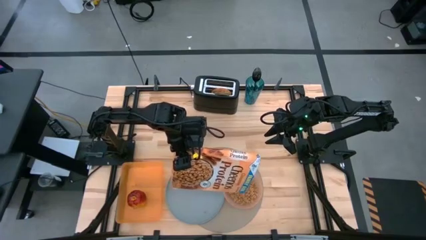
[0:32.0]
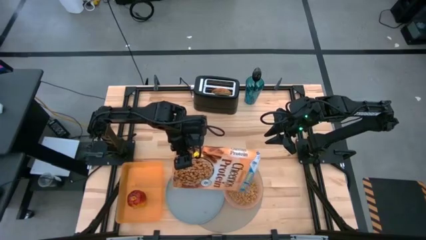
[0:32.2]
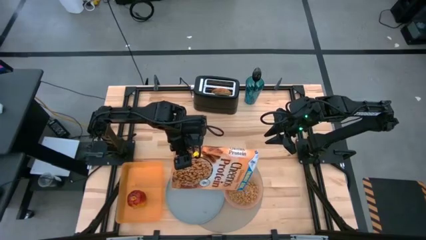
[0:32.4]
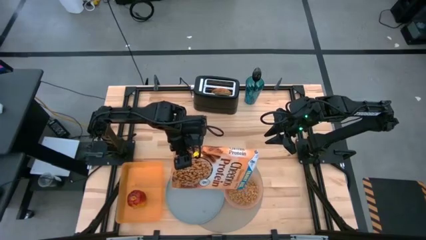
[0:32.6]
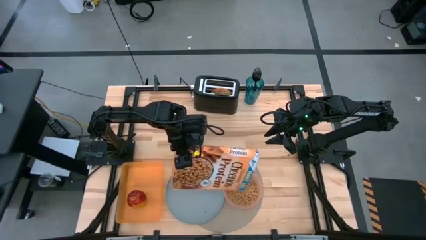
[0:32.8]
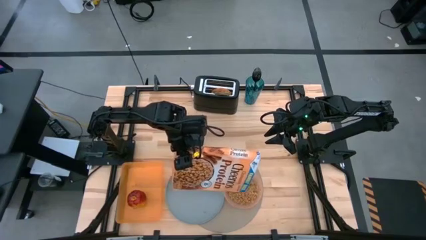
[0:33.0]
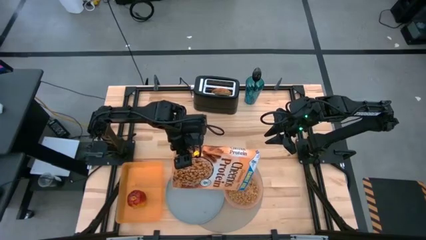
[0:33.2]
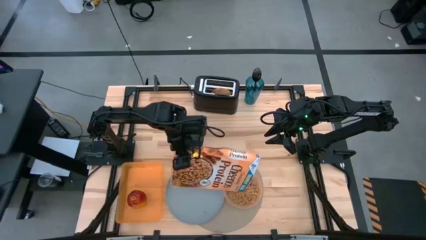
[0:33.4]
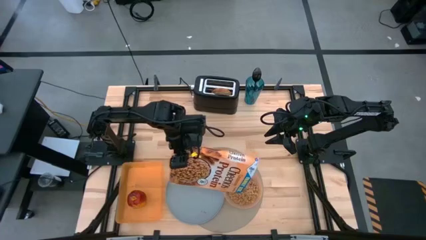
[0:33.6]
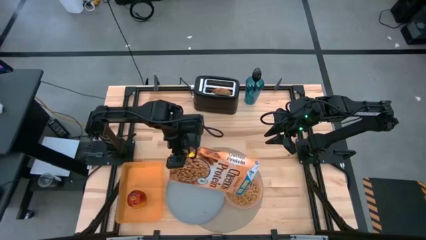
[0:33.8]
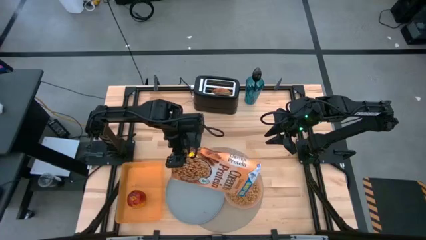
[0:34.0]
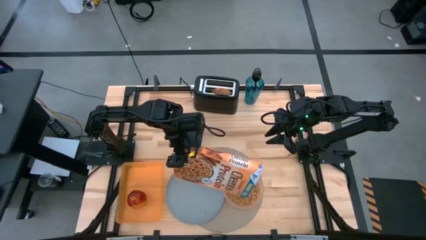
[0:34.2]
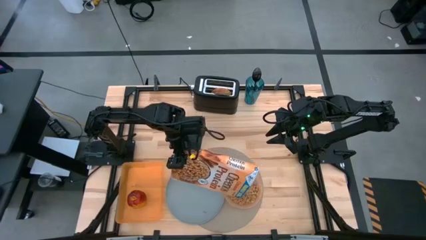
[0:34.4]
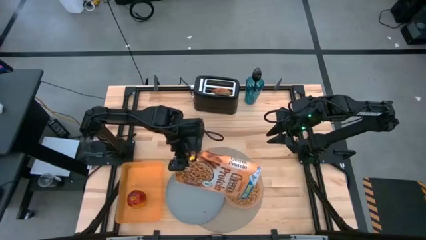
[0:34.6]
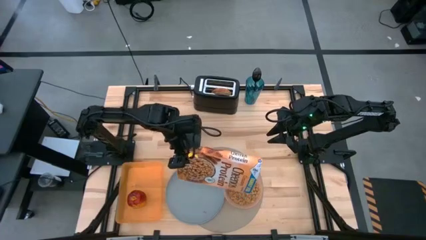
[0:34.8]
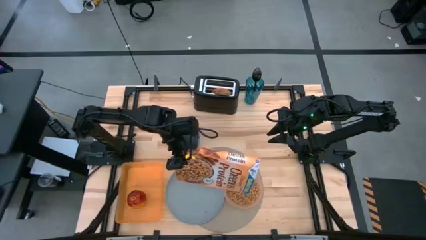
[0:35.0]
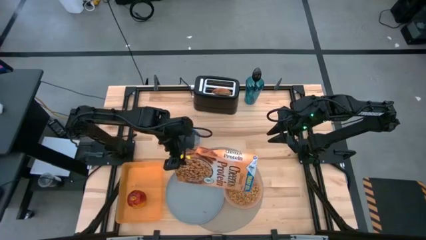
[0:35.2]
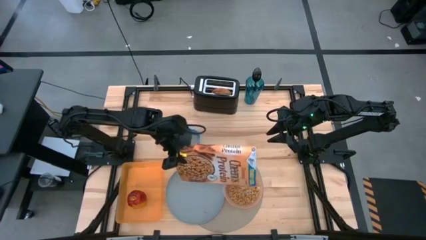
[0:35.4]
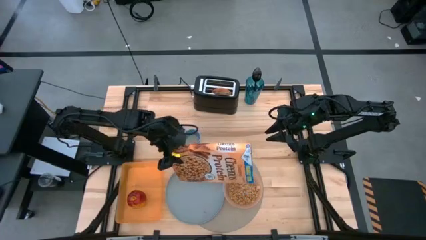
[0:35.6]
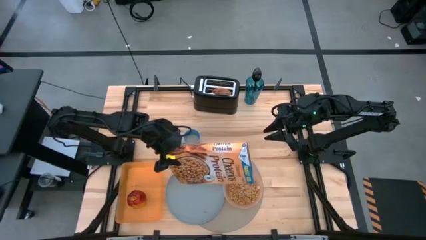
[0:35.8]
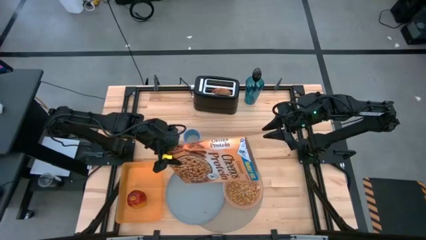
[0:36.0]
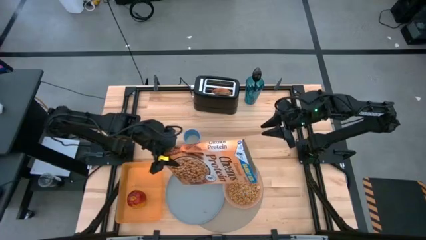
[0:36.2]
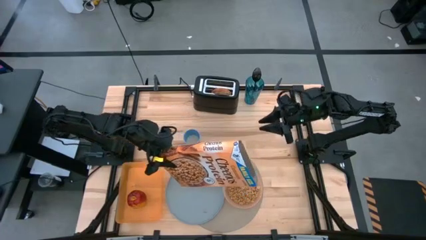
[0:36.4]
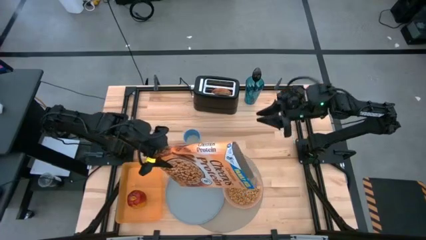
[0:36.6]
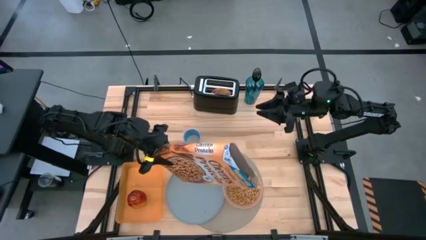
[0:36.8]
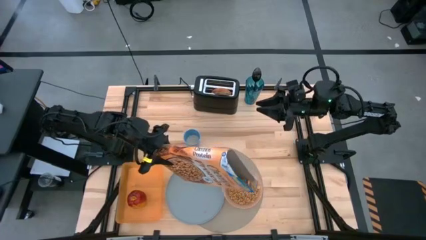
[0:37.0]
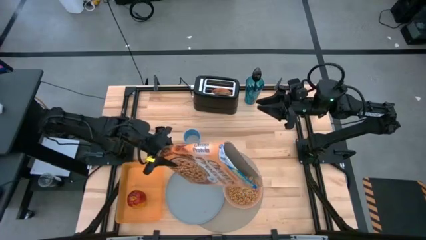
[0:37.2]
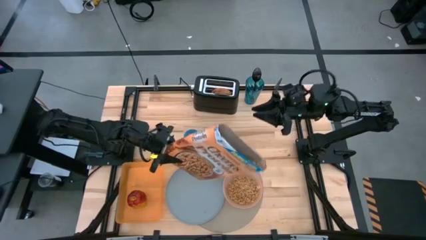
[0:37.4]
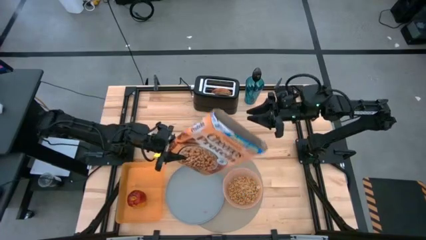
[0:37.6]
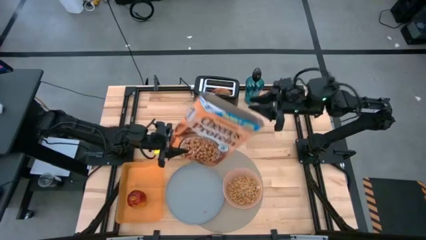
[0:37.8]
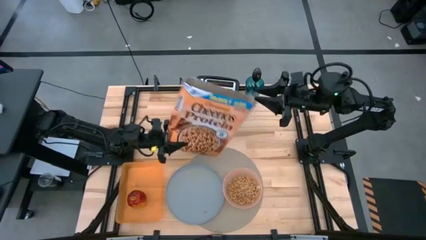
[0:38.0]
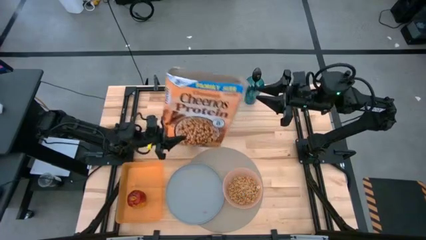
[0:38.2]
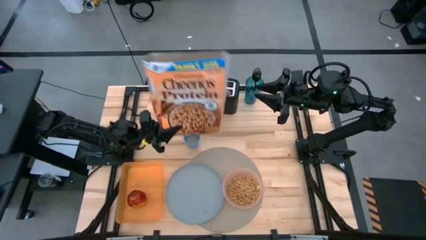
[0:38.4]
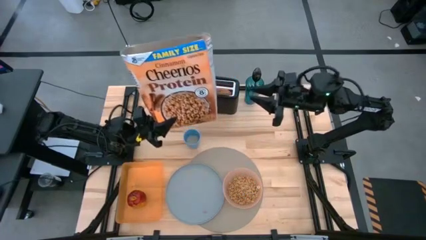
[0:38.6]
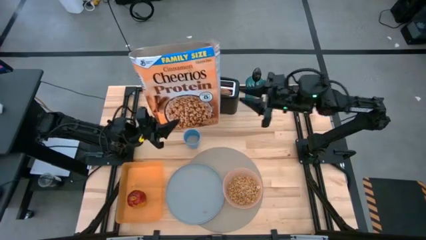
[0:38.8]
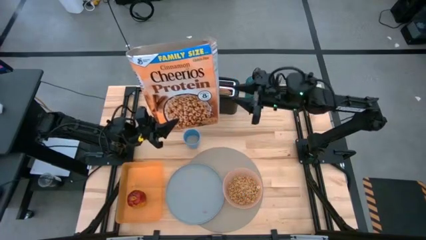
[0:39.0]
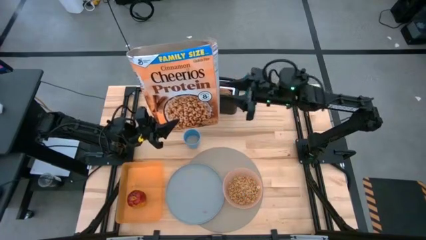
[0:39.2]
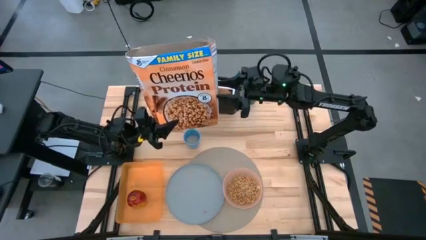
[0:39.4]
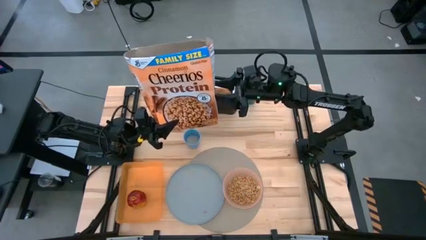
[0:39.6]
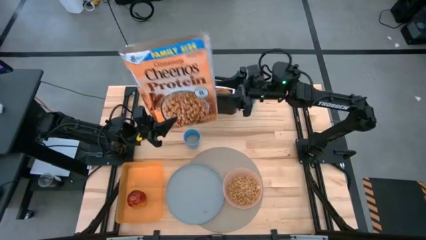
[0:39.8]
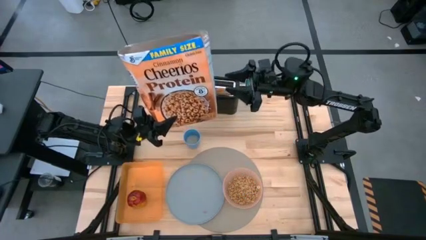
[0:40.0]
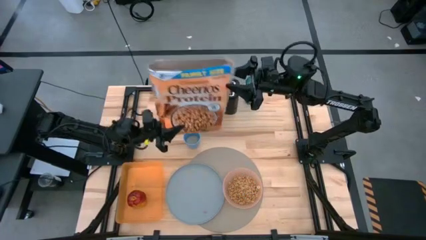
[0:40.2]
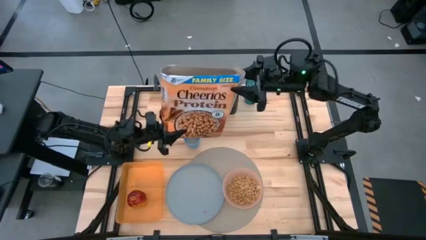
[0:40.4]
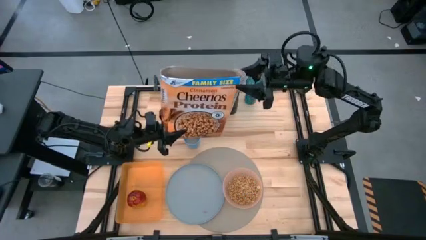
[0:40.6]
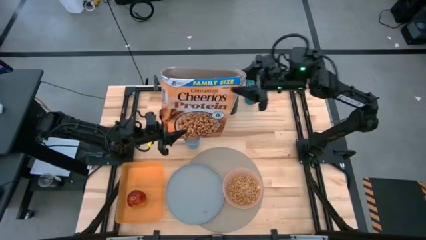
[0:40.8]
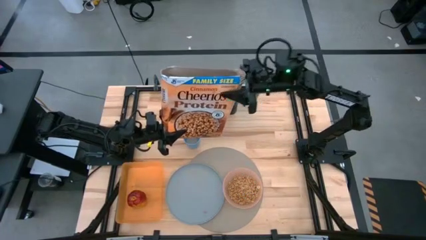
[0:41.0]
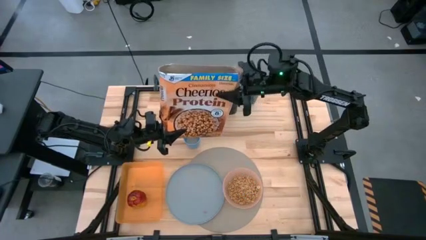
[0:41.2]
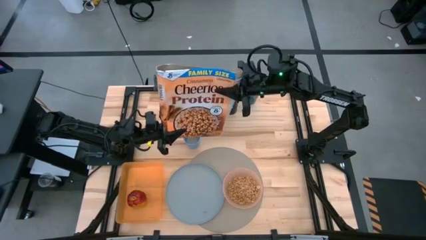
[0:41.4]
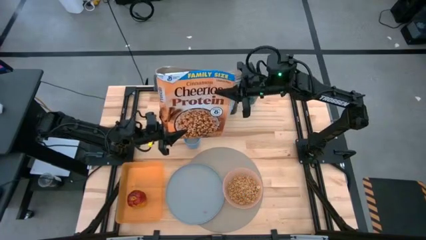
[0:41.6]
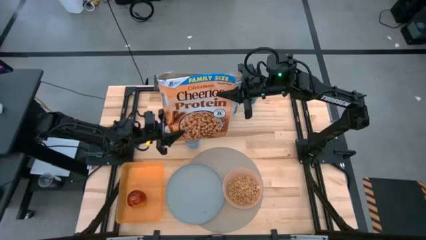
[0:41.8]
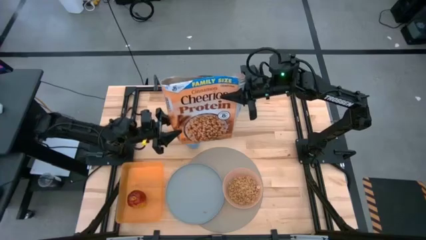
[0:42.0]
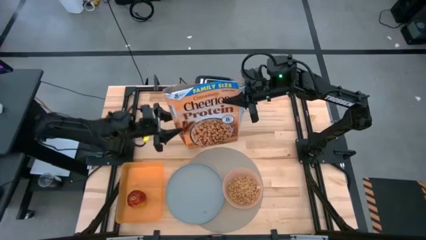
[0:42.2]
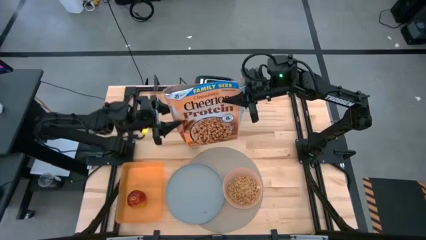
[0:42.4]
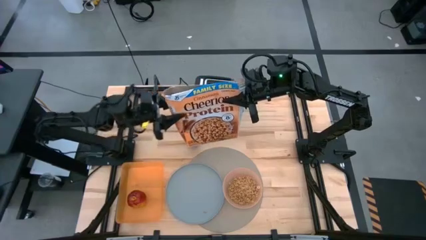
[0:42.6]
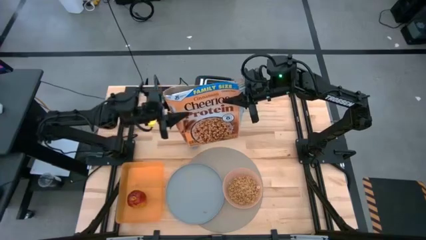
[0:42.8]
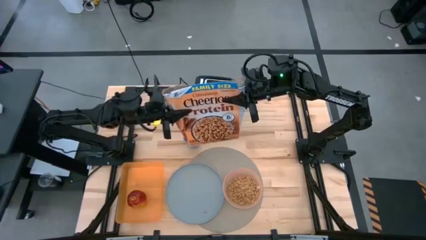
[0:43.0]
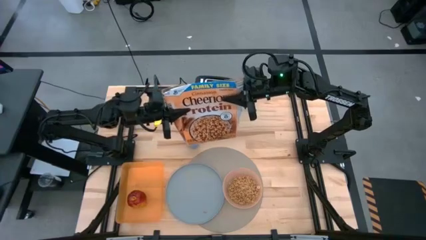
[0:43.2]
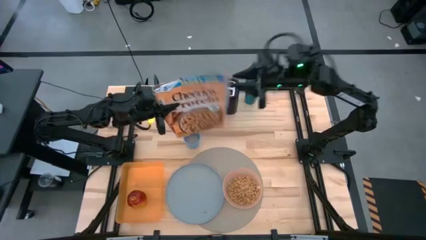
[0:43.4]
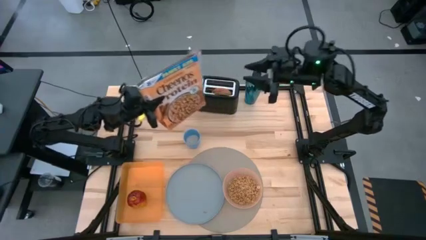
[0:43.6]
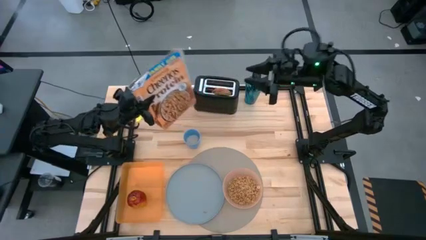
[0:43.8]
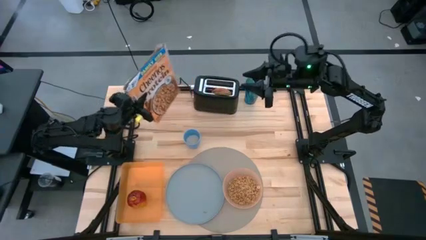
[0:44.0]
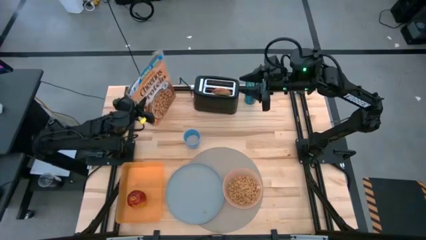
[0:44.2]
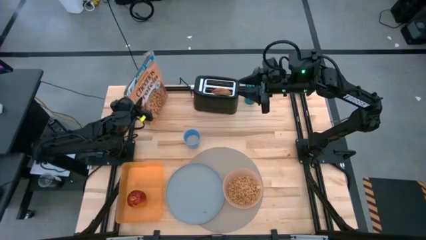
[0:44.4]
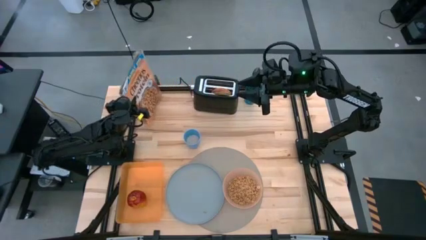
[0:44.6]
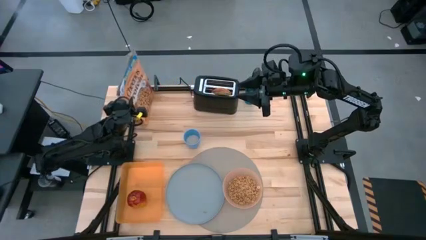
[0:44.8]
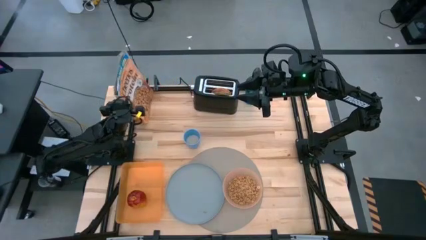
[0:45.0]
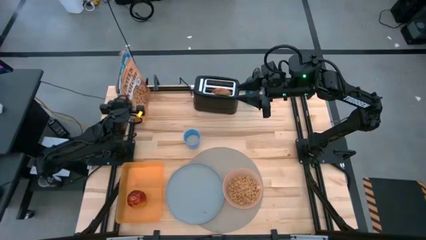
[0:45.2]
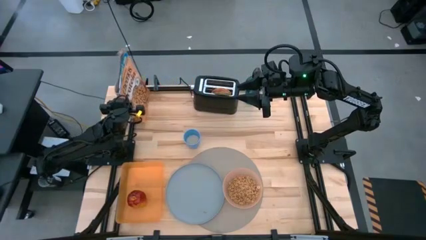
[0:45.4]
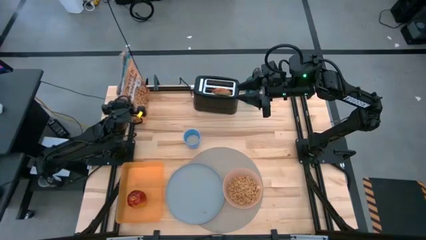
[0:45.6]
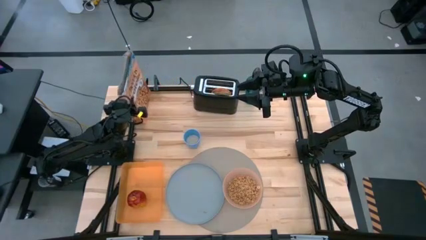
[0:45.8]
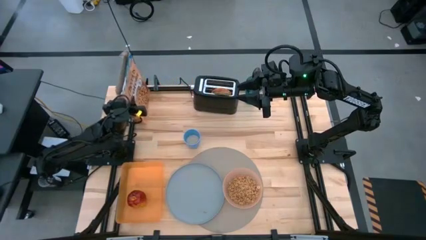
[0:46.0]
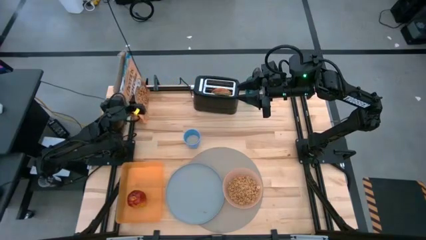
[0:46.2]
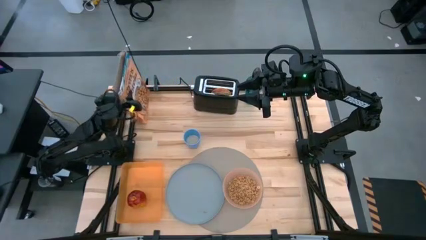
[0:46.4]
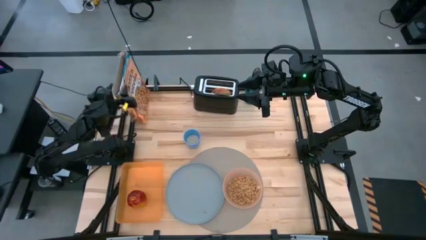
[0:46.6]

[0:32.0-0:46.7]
Task: Arrange a breakfast setting
Pour the cereal into the light pink bowl
